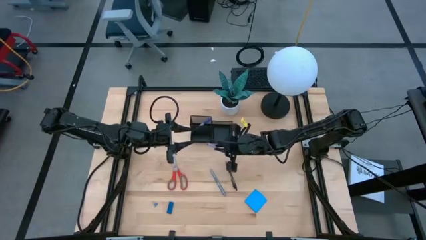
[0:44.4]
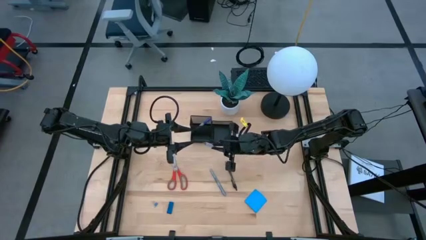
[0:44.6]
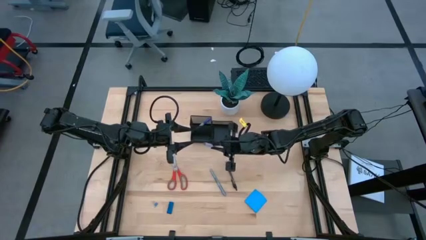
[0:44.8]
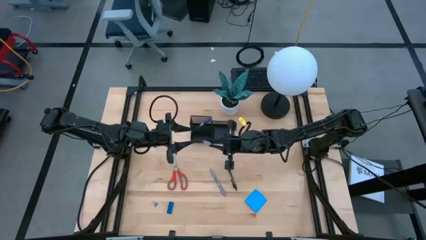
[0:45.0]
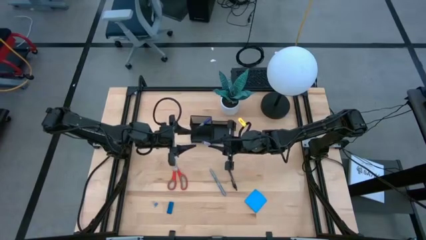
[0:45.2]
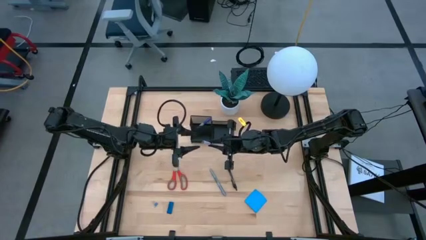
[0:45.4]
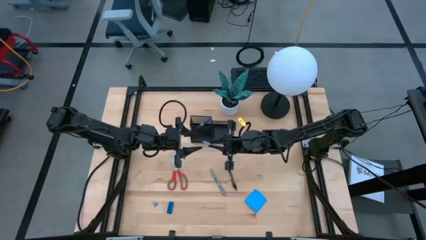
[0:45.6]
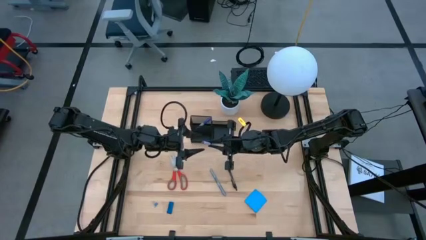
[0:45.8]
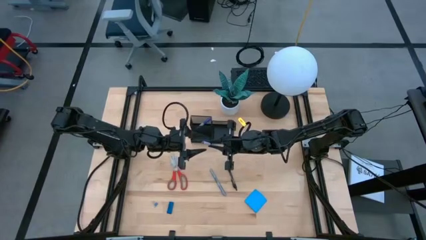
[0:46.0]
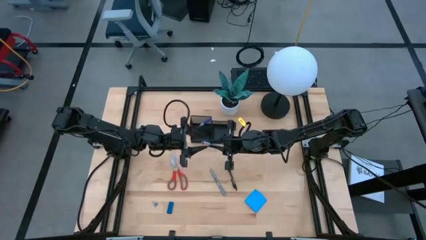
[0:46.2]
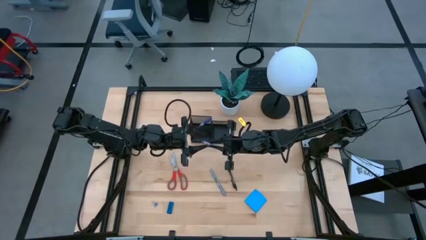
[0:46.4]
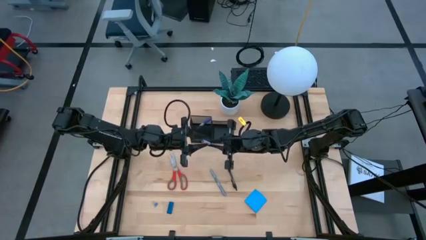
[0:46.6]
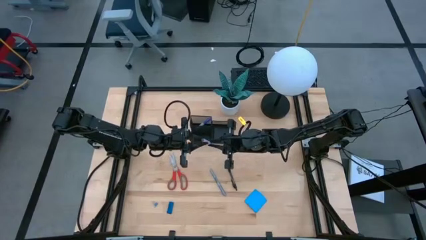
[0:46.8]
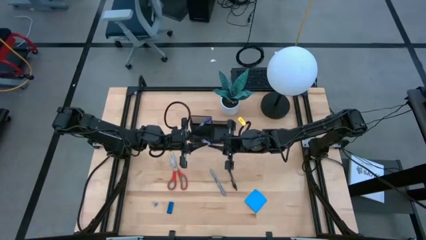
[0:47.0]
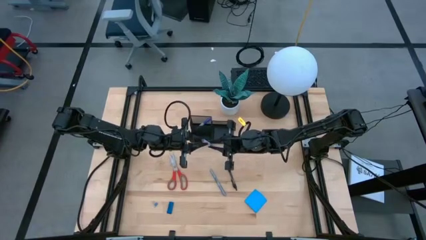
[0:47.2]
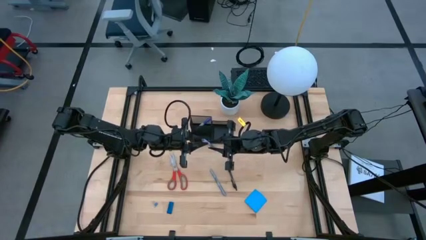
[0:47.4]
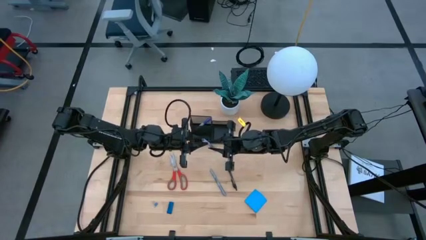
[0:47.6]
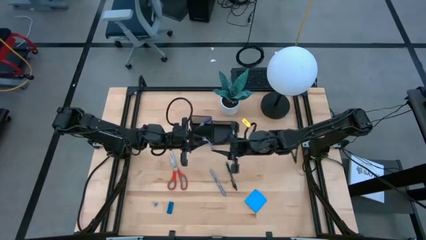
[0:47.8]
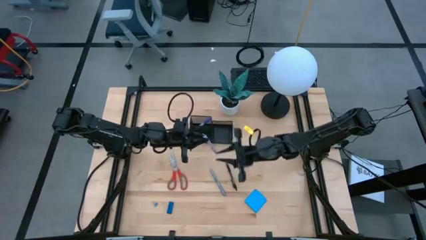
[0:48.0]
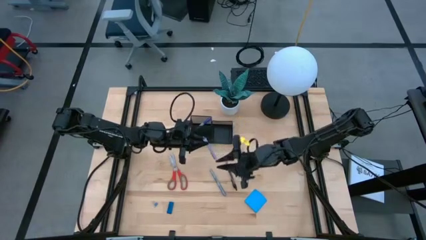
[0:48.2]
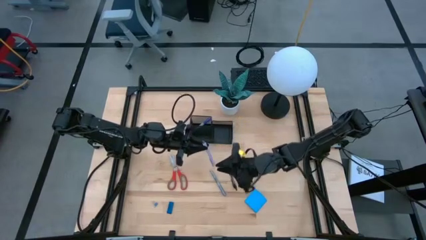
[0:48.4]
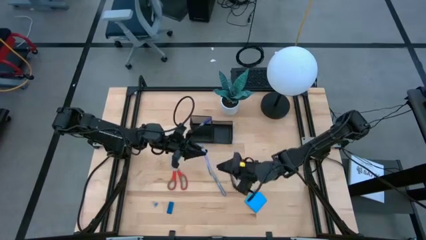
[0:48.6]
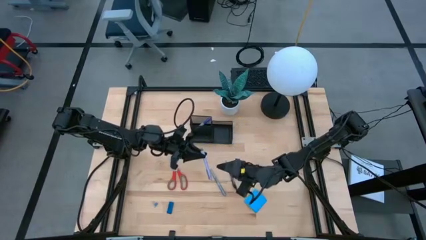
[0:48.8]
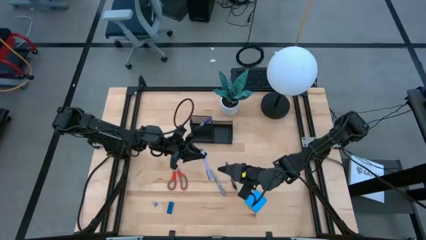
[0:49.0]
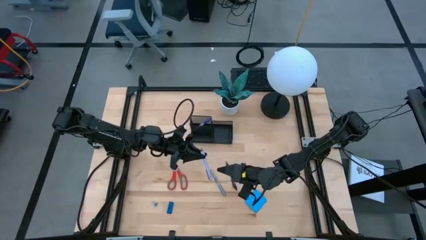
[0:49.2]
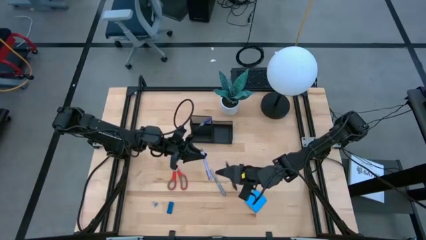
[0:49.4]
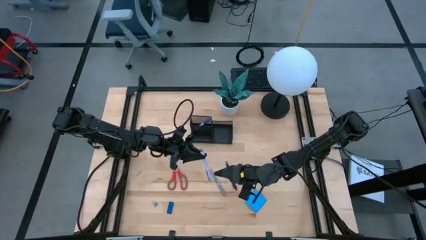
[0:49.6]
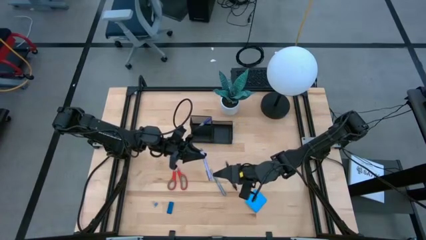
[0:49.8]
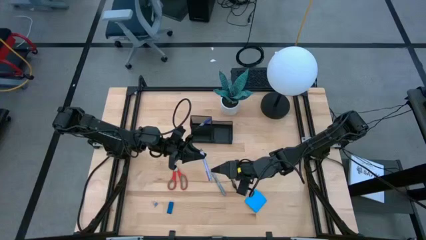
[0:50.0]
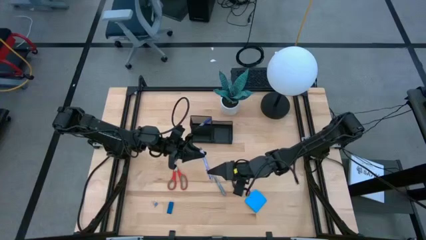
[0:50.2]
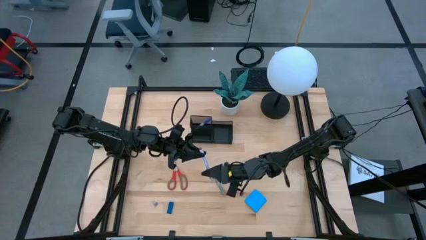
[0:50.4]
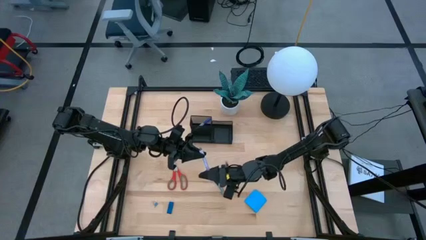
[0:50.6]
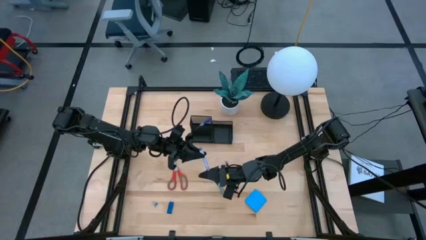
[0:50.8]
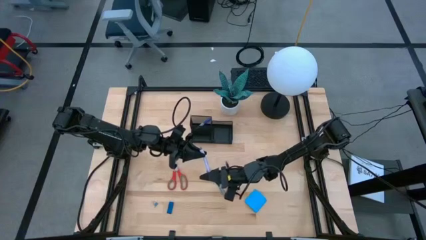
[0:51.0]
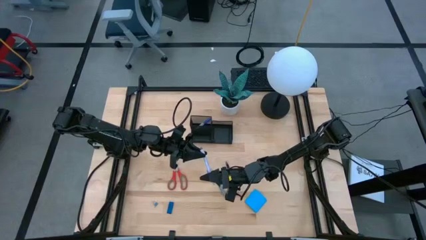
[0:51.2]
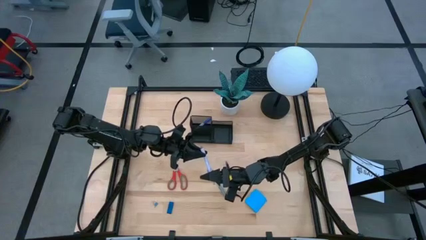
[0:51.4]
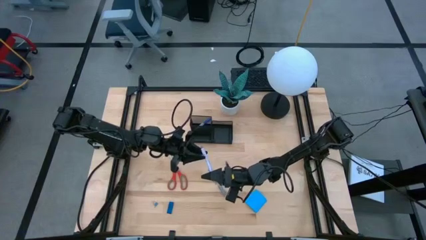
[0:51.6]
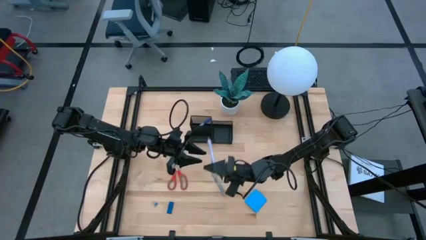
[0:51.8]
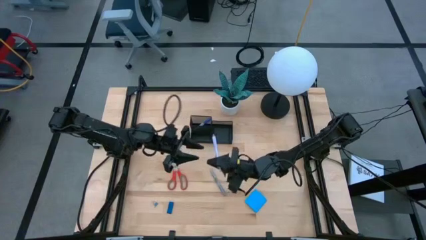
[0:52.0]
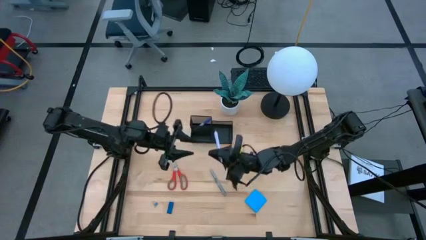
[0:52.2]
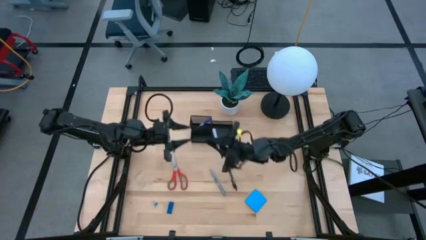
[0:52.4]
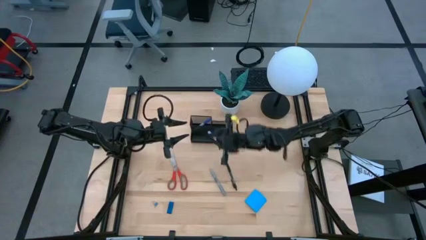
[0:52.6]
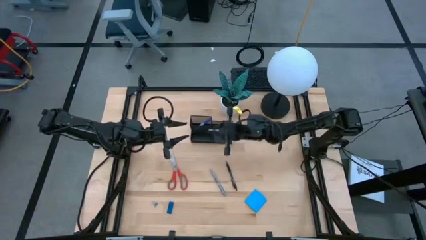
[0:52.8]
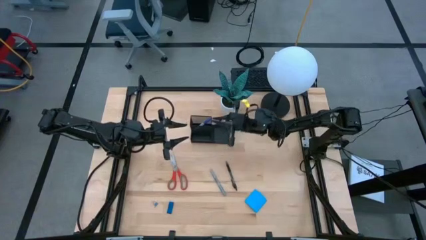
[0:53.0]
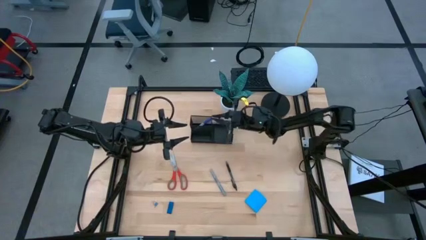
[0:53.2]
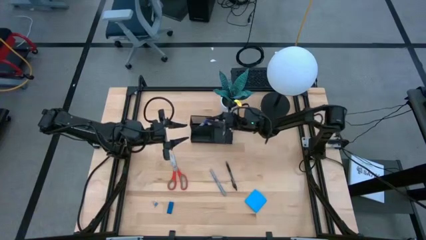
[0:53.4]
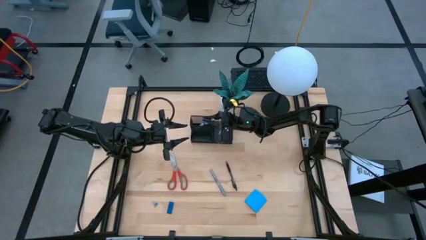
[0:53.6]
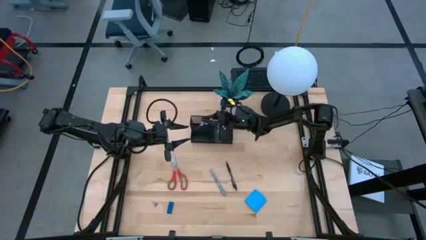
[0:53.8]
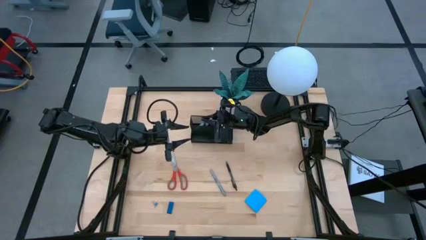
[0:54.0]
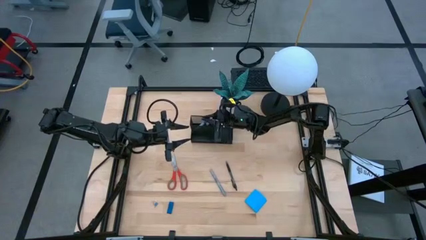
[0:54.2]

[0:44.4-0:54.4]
Task: Pick and place office supplies into organizer
Put the purple pen into the black desk organizer

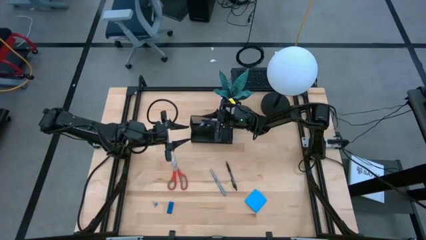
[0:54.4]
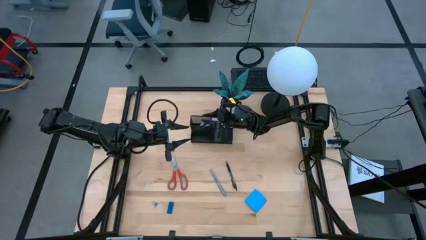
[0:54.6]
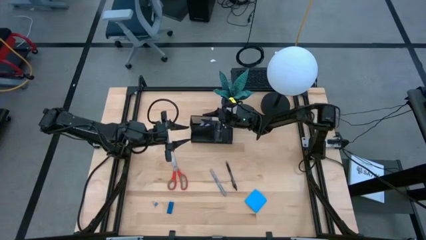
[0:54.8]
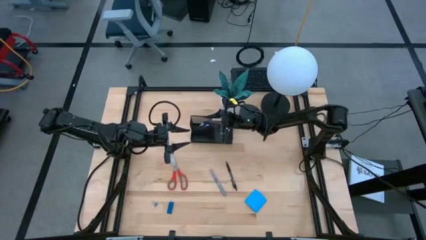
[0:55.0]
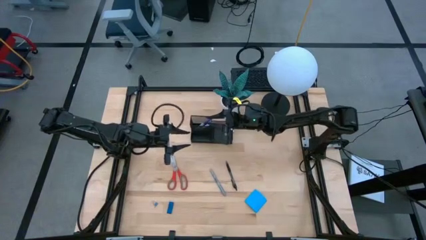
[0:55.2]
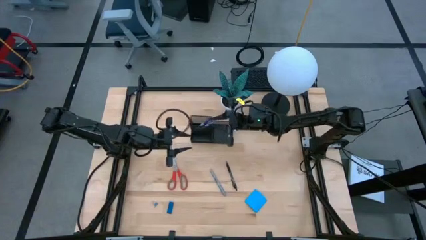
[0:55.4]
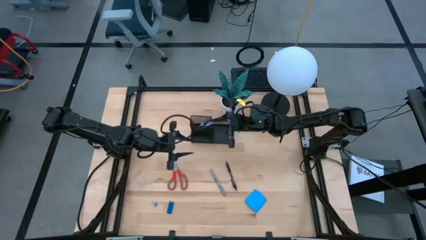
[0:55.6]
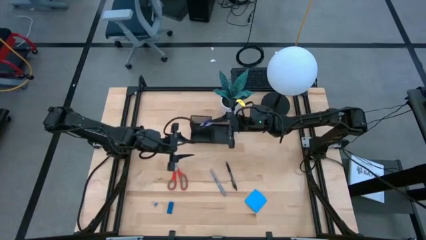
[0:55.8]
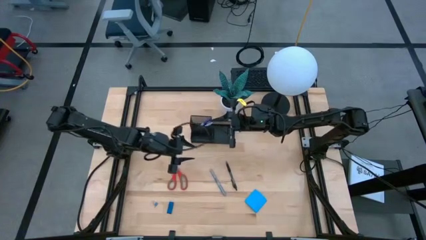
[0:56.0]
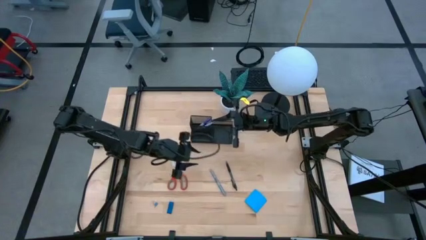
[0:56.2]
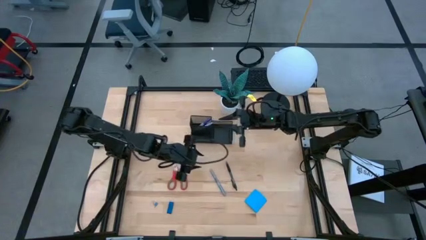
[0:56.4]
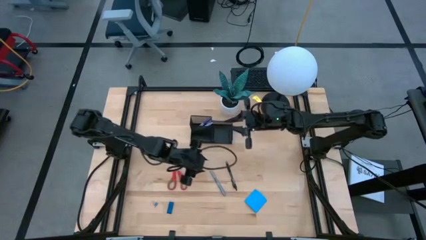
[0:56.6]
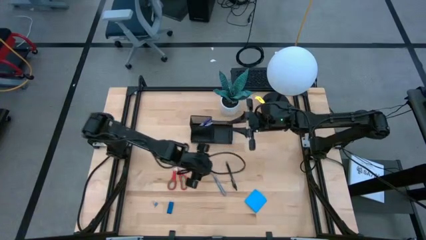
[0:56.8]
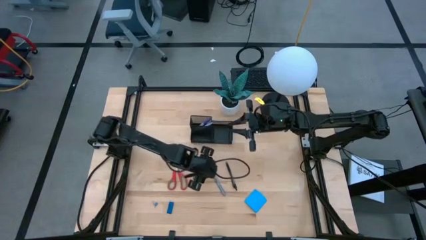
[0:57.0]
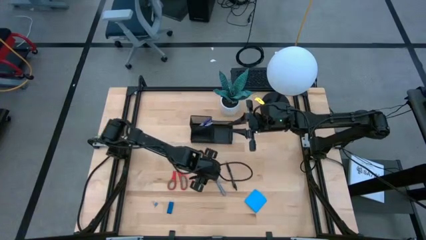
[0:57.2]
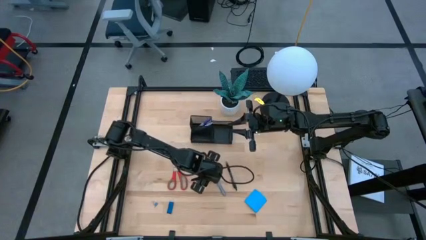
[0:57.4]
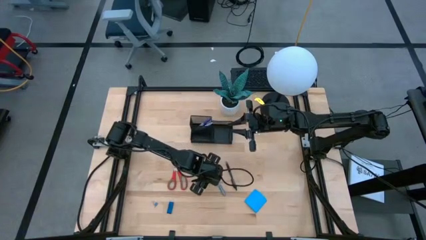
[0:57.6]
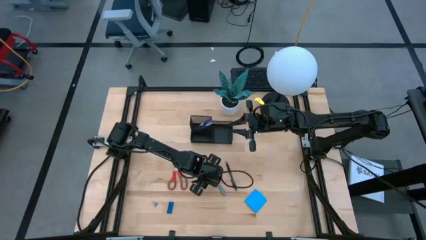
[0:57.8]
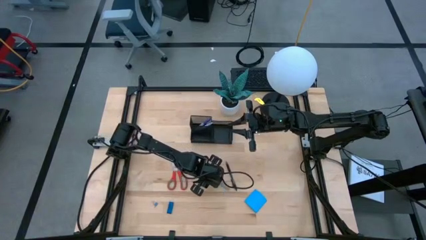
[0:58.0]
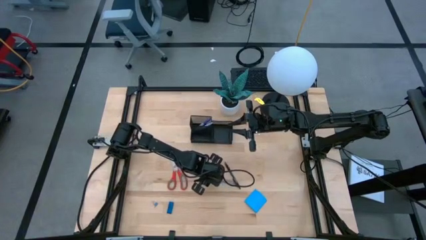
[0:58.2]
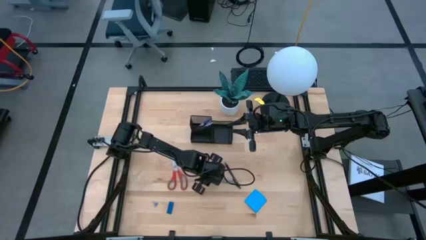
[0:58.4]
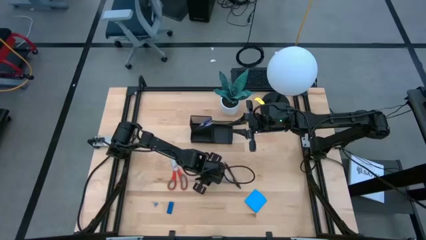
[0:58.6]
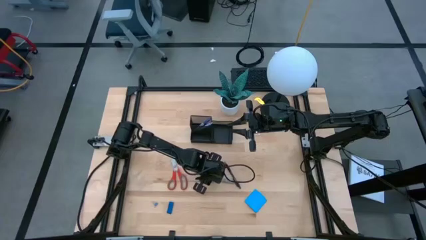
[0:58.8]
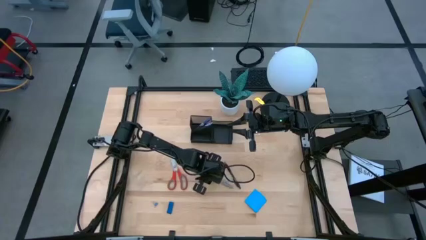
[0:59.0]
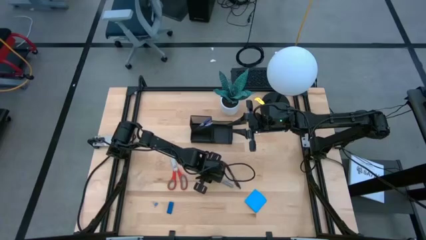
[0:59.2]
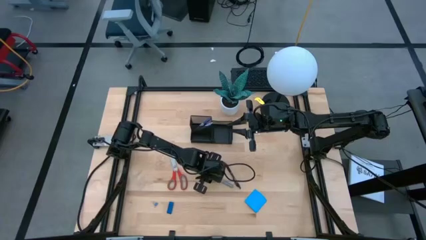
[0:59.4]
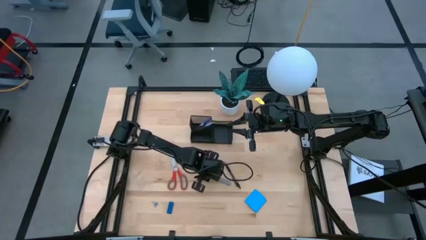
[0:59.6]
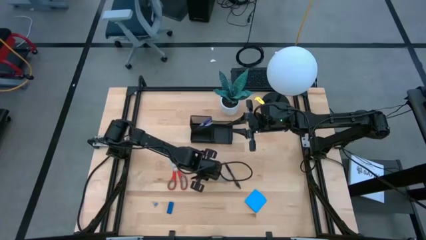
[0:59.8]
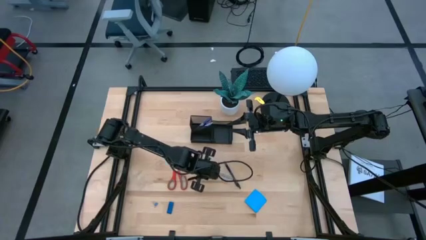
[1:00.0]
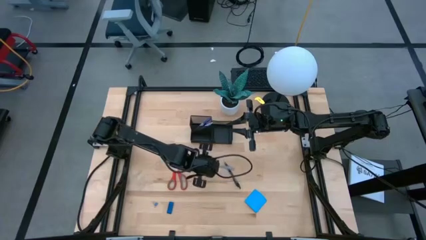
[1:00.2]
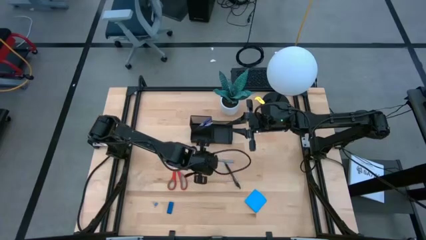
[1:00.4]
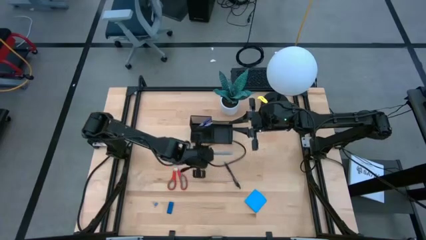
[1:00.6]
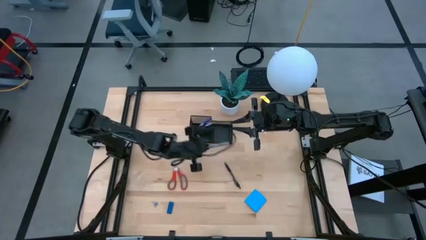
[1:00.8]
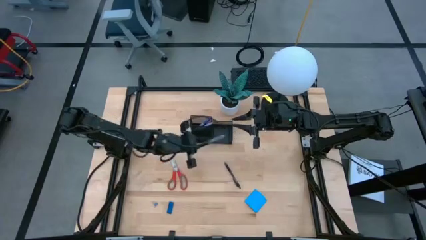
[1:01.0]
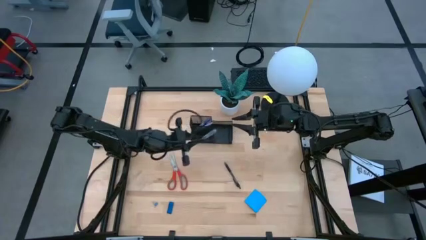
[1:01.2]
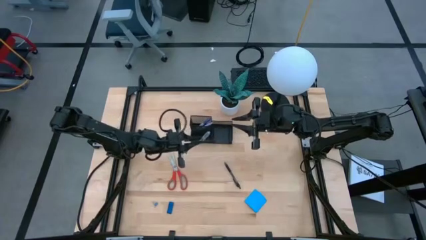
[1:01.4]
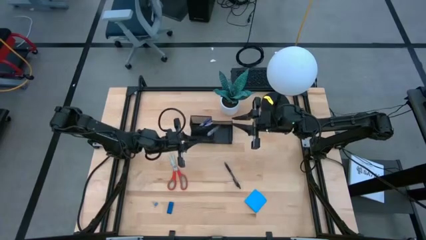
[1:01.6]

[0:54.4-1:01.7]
Put the gray marker in the black desk organizer
